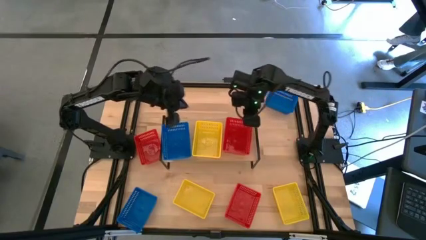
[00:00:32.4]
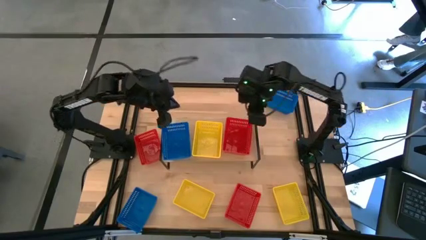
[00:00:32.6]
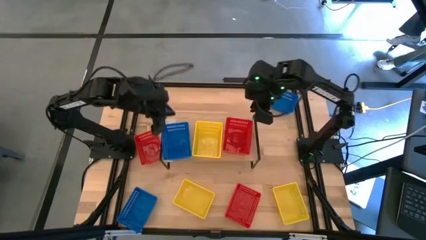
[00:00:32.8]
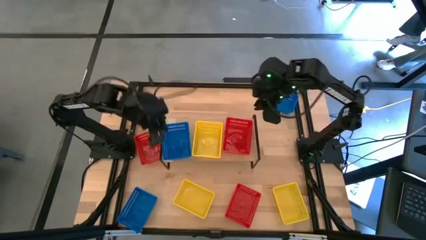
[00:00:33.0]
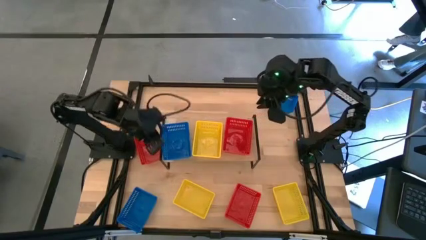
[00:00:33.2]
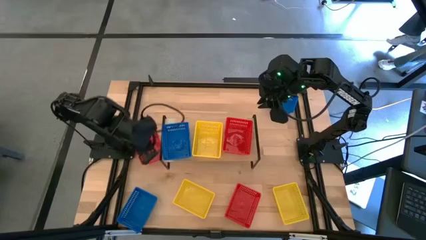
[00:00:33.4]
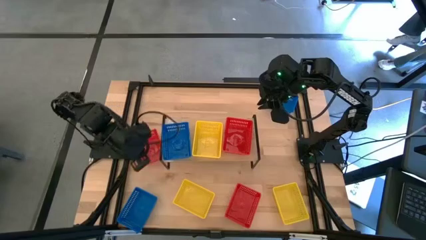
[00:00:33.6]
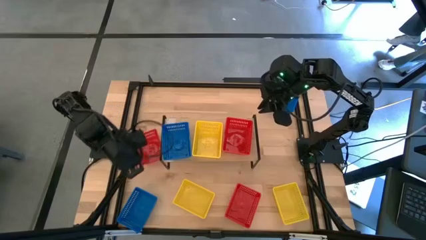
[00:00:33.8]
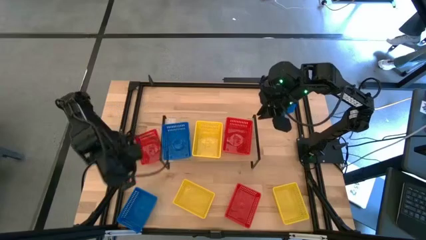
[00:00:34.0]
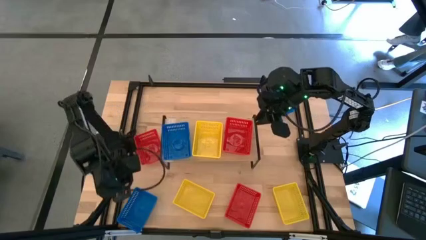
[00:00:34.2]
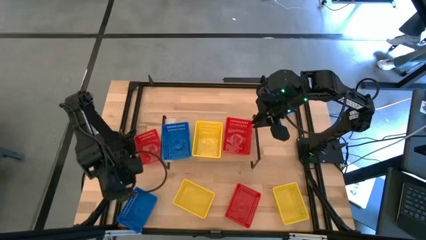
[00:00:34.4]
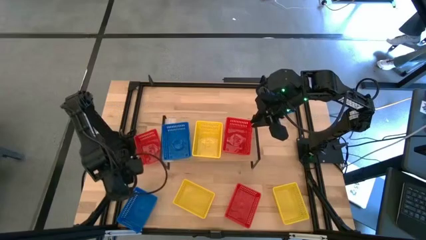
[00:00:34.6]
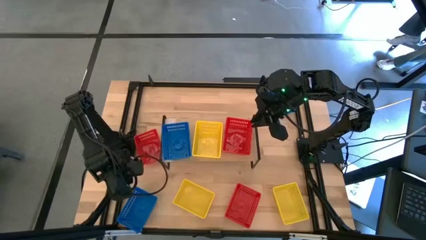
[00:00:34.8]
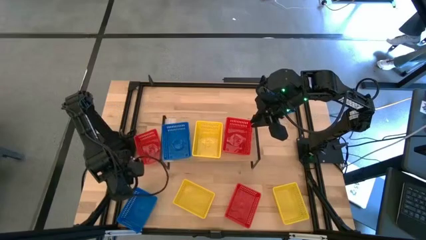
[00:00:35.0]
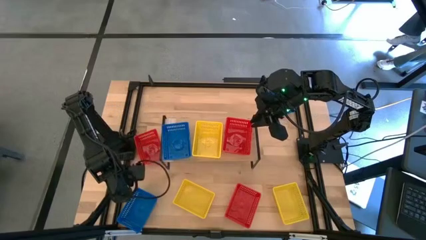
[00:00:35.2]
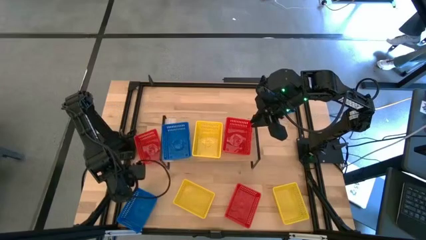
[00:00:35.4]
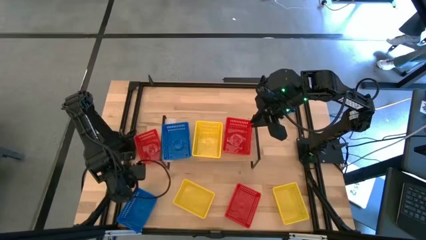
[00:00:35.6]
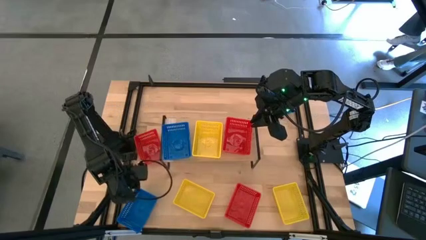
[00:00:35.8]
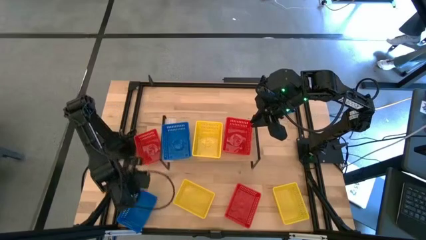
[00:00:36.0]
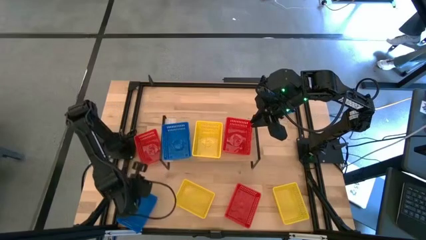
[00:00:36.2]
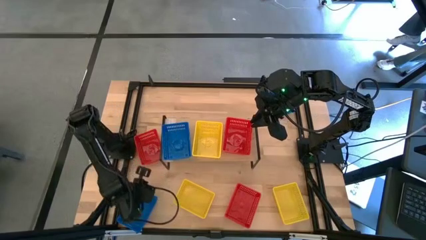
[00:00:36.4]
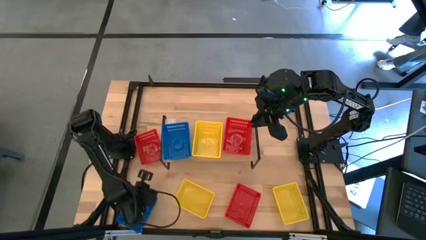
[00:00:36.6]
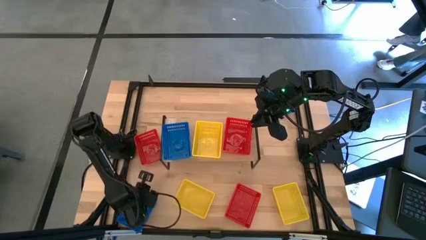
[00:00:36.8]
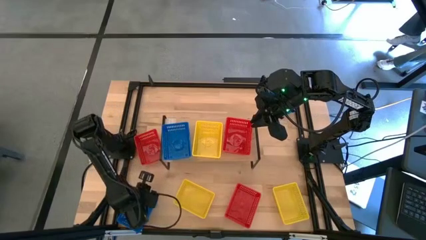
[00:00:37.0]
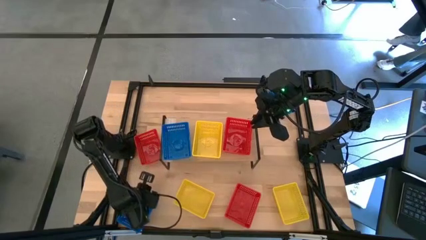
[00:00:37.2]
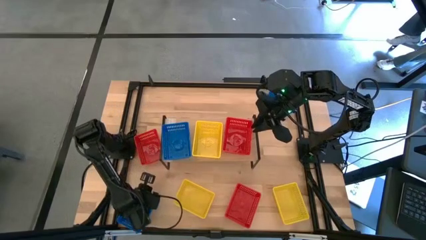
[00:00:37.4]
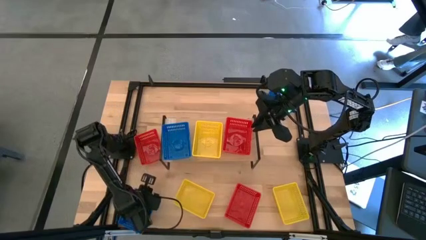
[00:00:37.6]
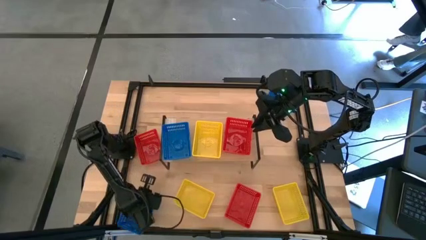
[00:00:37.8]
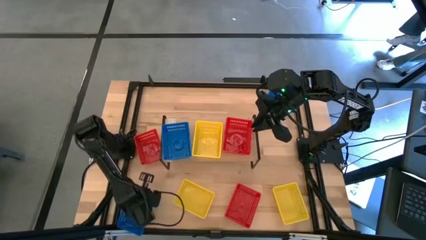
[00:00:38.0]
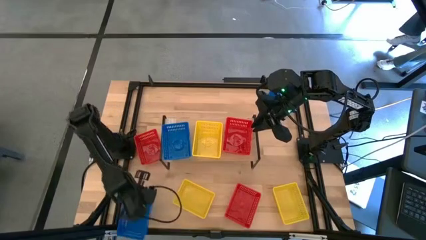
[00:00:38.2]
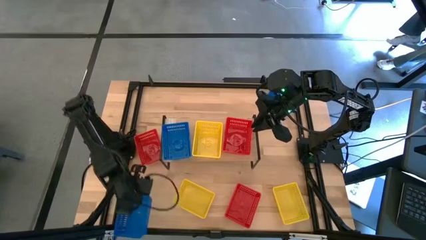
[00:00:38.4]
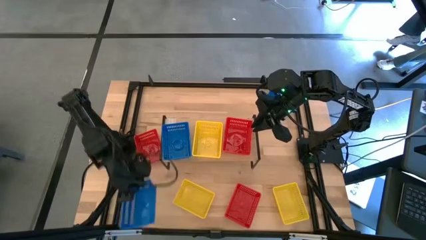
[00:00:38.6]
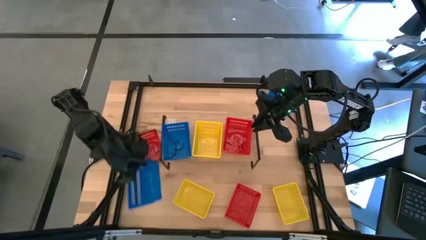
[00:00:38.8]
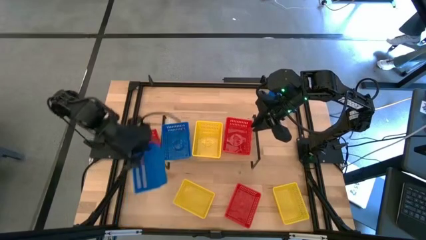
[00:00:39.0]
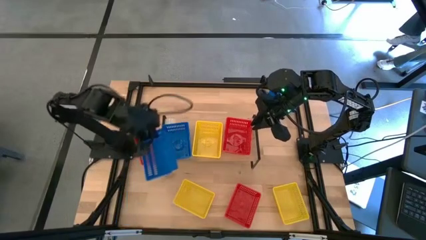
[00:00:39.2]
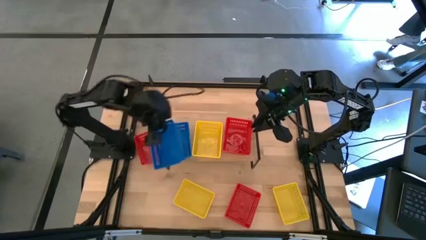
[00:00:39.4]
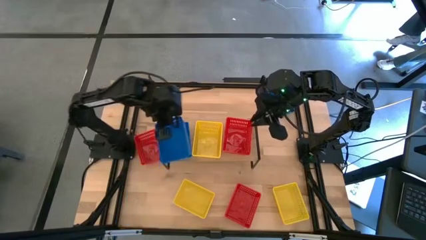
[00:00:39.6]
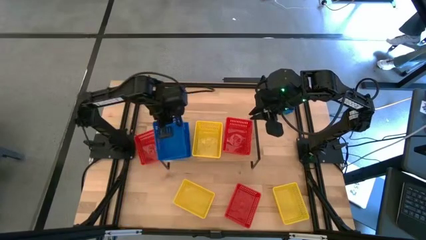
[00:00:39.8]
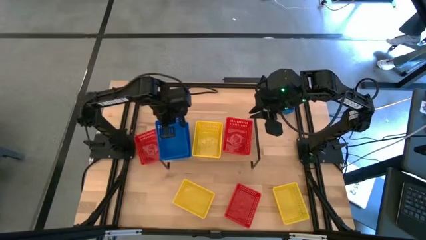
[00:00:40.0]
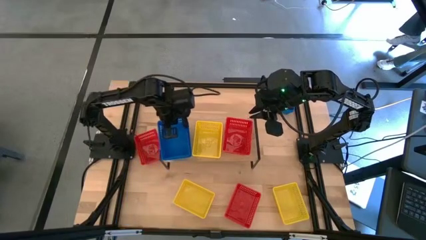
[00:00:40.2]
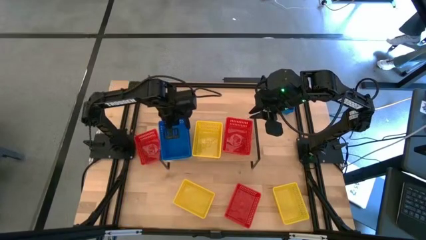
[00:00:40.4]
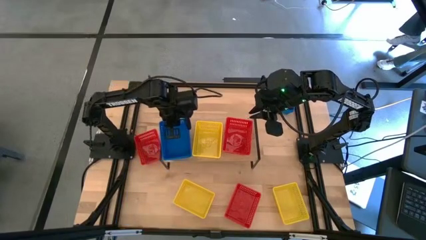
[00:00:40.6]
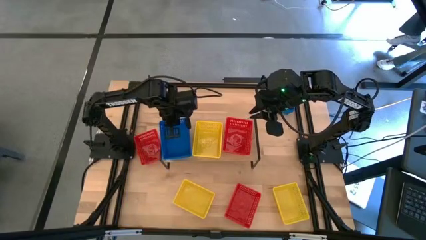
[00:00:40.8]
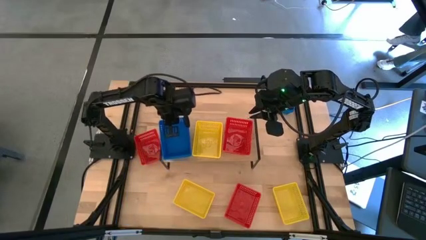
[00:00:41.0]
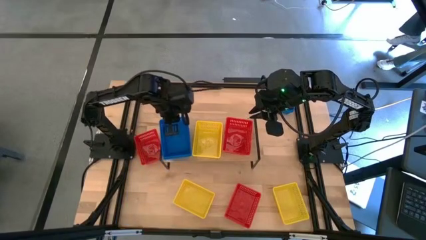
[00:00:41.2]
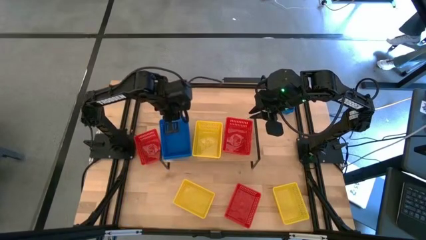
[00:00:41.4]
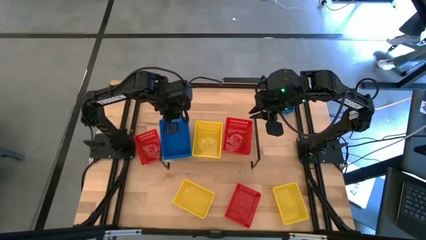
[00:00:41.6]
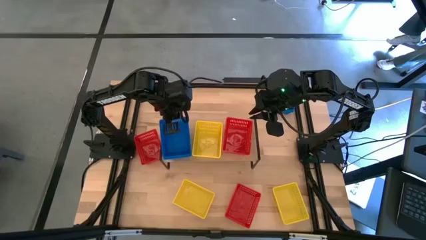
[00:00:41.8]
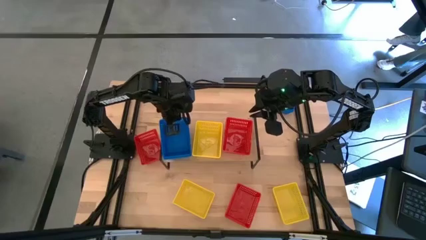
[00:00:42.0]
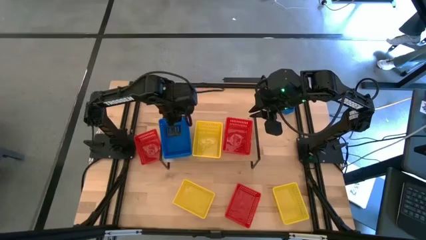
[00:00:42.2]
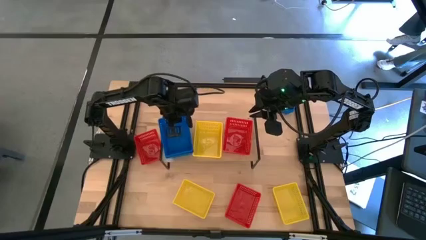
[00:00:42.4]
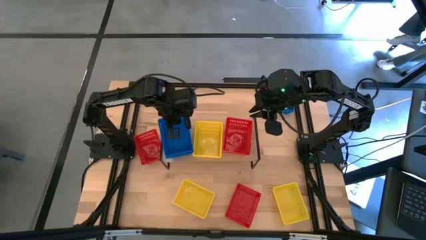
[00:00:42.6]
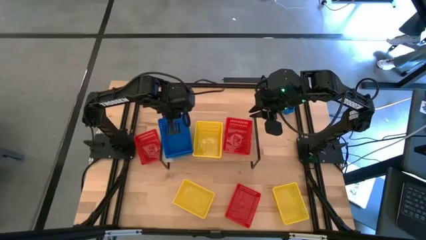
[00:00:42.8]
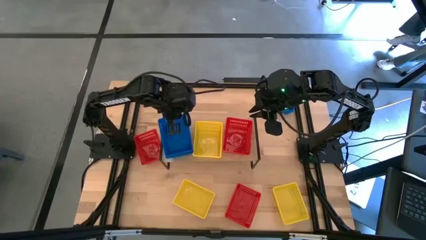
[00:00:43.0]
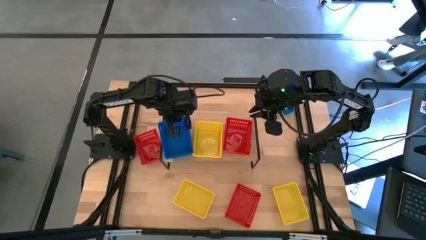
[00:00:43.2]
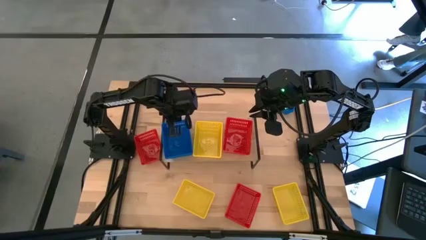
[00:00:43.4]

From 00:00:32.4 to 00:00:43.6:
Task: Stack baskets on shelf by color
Stack the bottom blue bin on top of the blue bin on the shelf

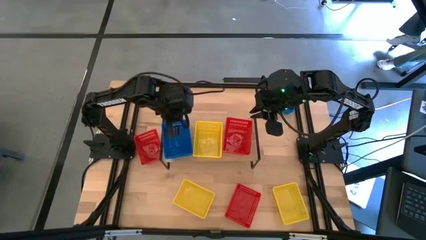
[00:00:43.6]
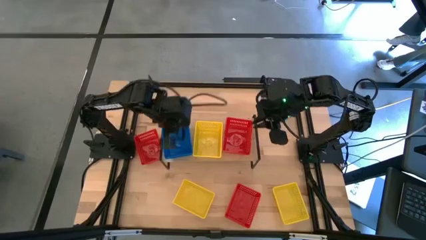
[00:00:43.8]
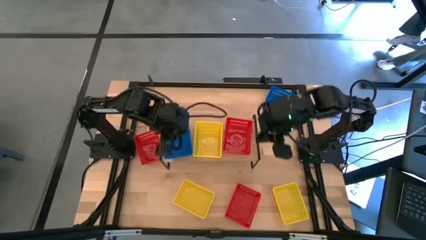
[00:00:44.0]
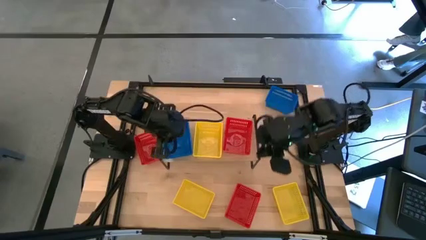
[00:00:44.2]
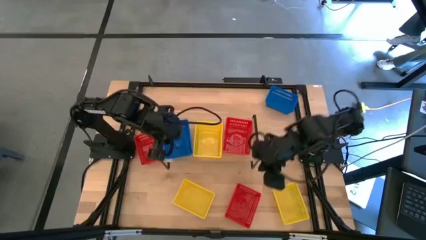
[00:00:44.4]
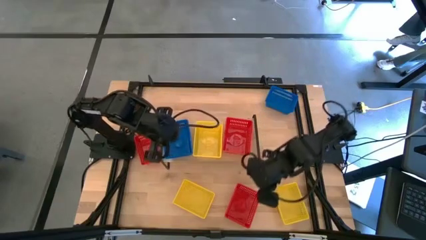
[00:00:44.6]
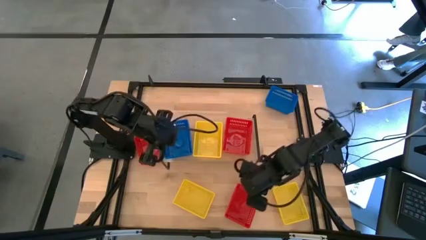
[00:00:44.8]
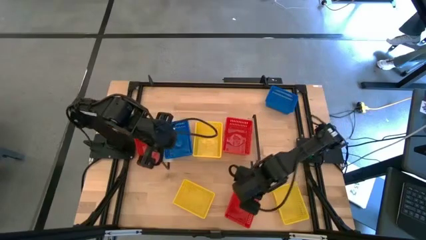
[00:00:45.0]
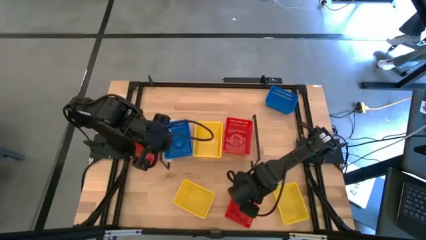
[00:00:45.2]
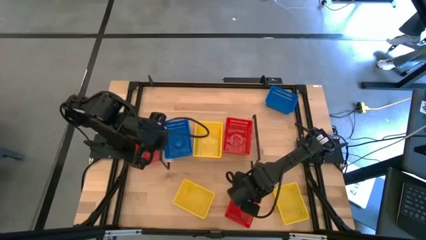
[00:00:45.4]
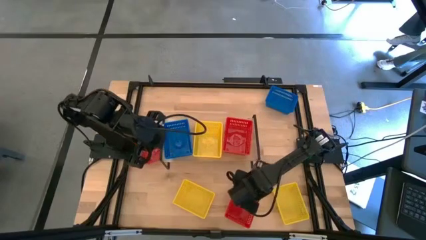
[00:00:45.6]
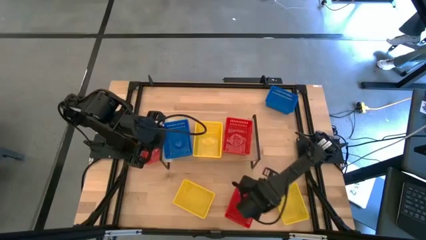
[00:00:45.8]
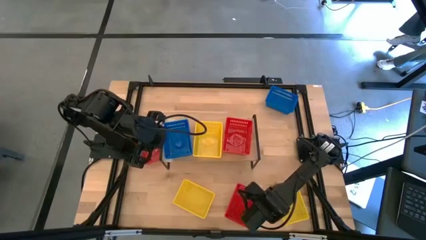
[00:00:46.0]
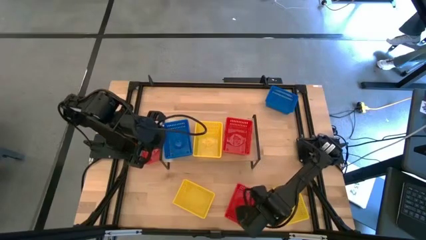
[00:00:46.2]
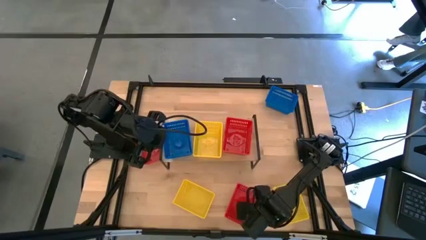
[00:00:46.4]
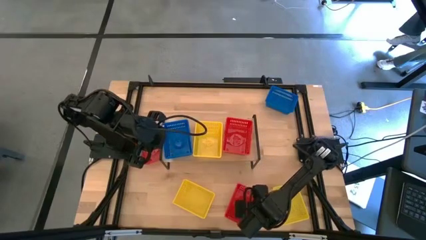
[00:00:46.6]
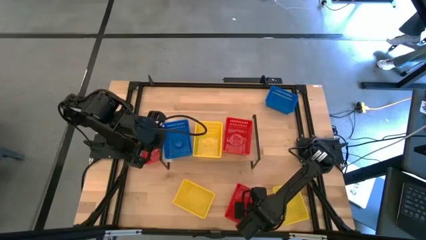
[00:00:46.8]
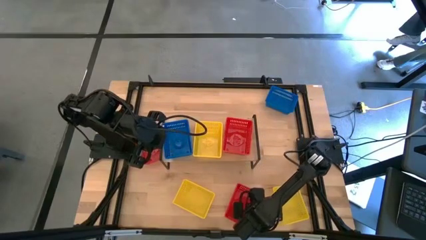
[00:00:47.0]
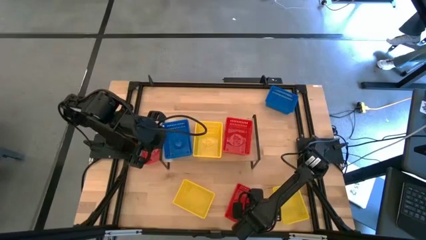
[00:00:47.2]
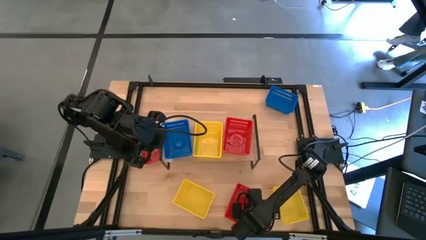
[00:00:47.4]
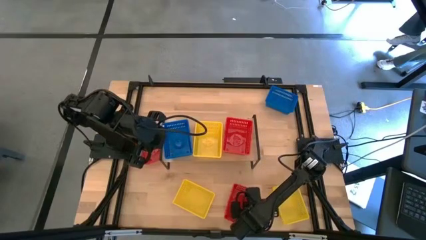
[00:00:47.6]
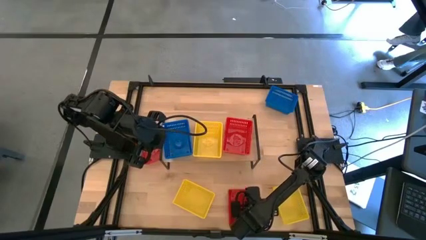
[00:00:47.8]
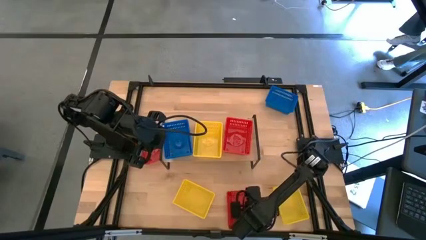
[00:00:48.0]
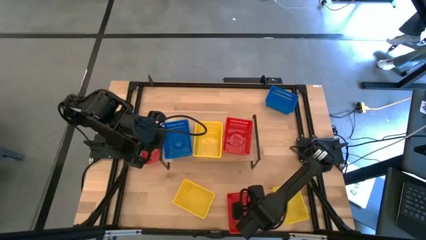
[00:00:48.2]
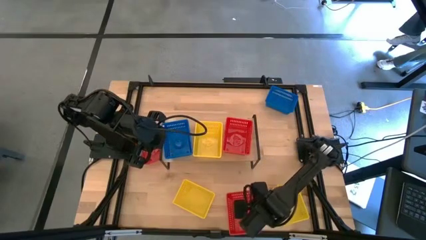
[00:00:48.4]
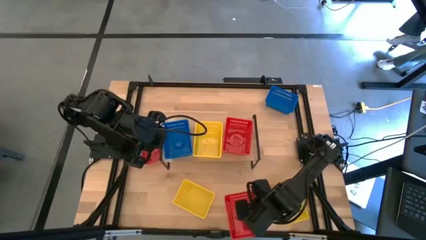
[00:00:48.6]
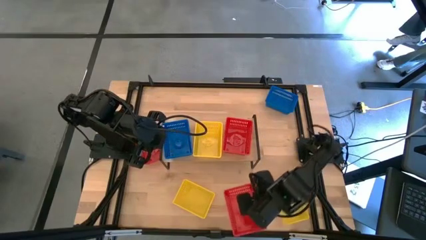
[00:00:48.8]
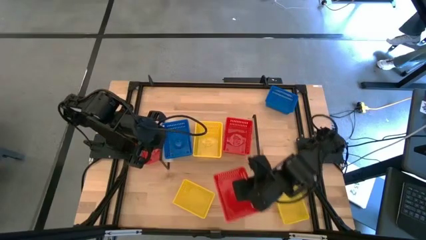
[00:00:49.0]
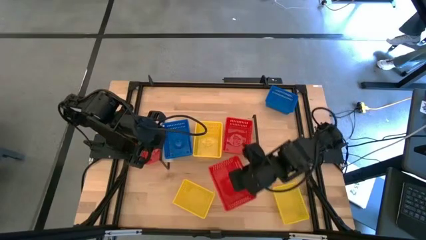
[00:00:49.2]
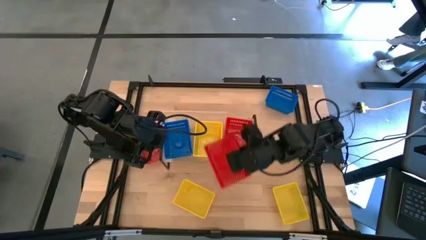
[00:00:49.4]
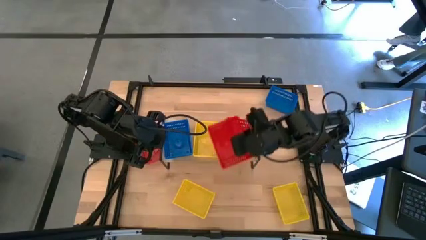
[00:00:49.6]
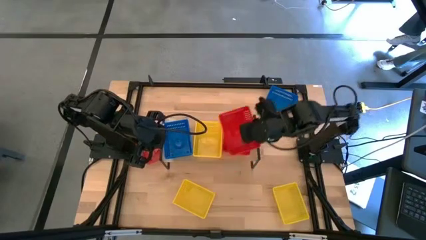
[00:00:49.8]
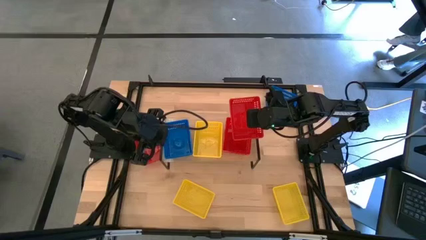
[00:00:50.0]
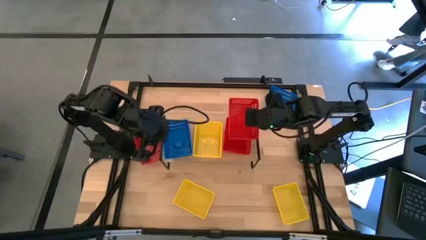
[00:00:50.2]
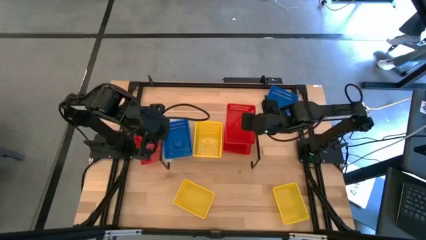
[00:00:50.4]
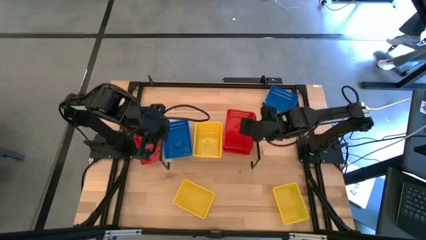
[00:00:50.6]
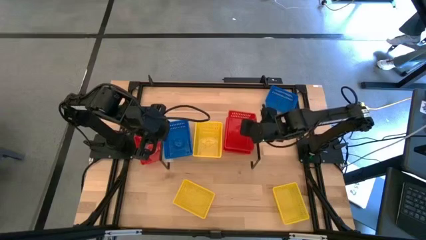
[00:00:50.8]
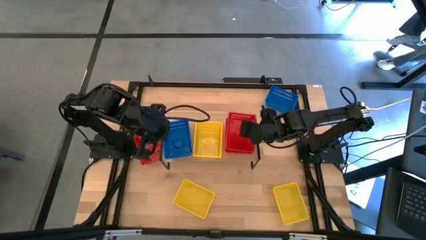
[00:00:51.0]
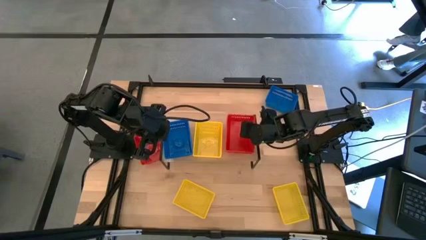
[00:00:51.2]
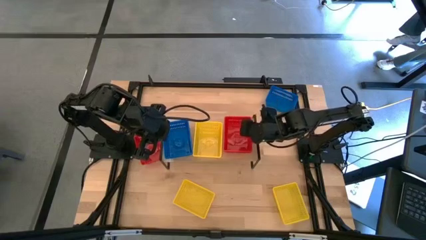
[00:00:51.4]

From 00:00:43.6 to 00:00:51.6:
Stack the bottom red bin on top of the red bin on the shelf
